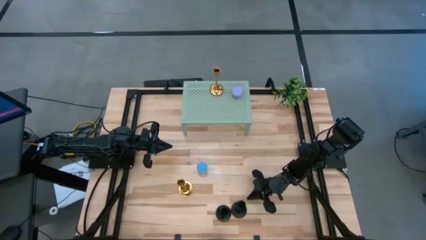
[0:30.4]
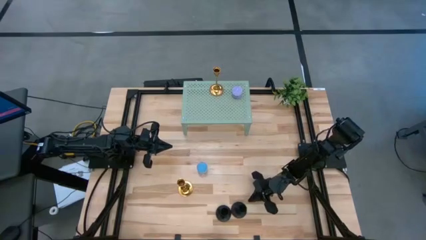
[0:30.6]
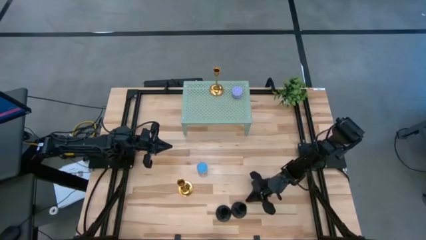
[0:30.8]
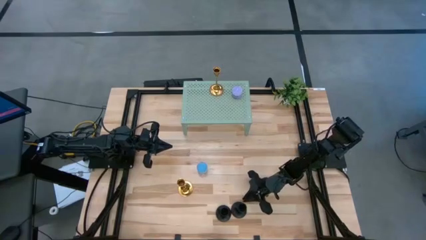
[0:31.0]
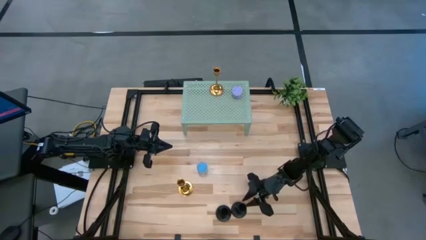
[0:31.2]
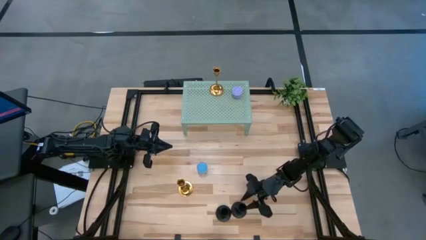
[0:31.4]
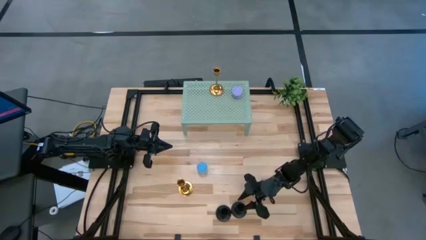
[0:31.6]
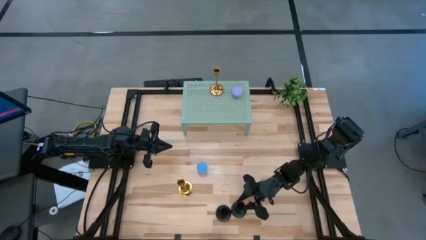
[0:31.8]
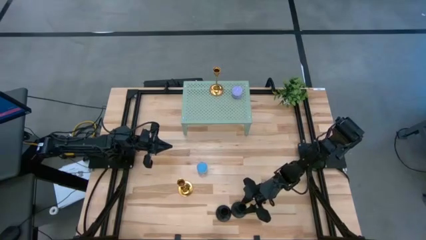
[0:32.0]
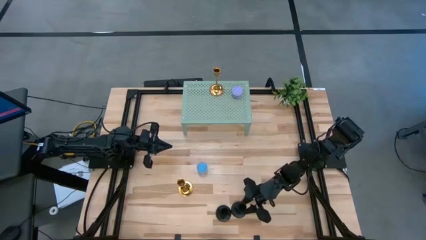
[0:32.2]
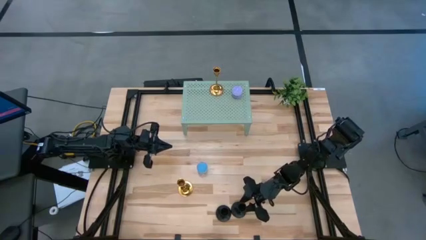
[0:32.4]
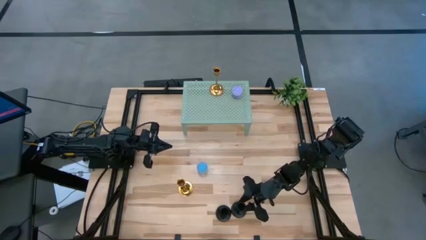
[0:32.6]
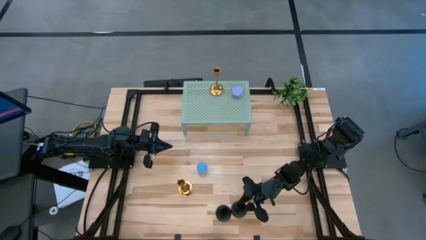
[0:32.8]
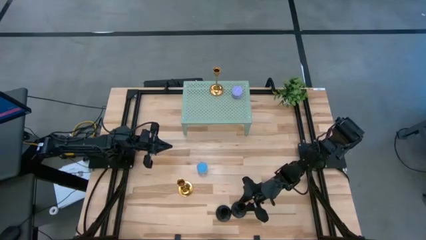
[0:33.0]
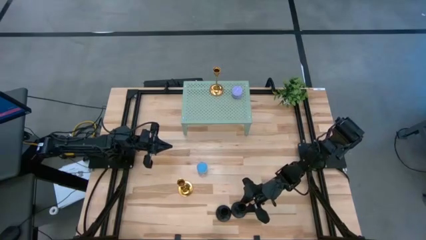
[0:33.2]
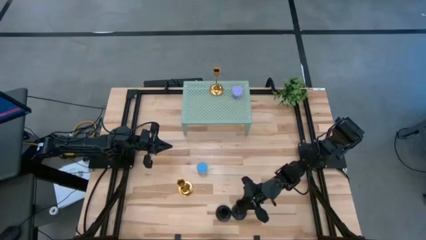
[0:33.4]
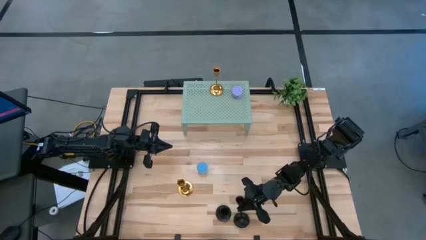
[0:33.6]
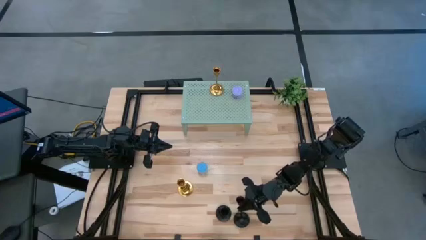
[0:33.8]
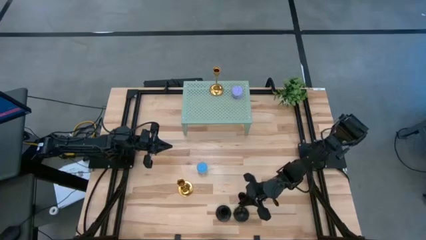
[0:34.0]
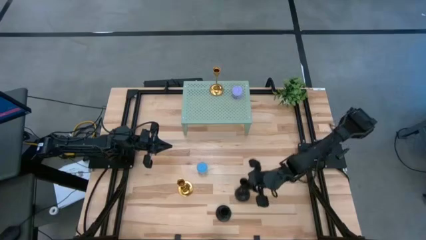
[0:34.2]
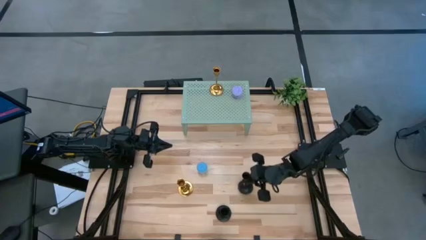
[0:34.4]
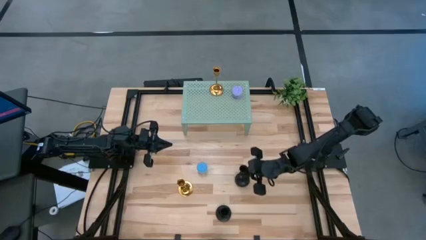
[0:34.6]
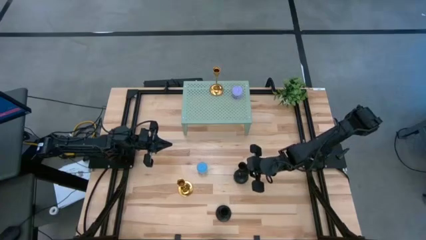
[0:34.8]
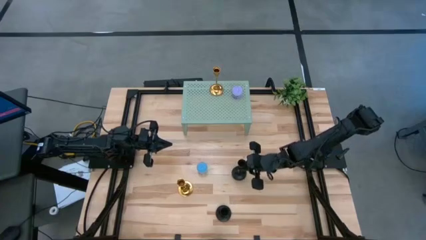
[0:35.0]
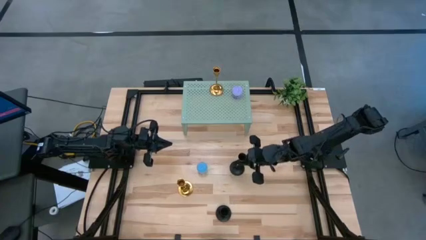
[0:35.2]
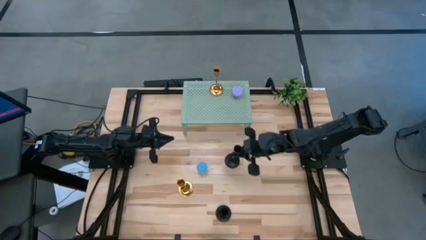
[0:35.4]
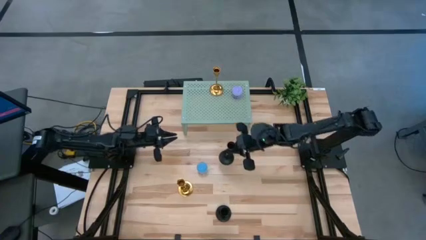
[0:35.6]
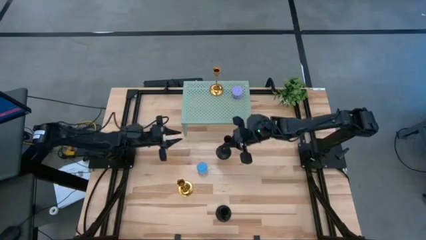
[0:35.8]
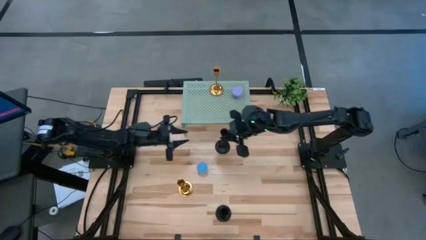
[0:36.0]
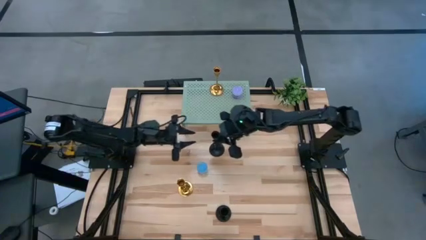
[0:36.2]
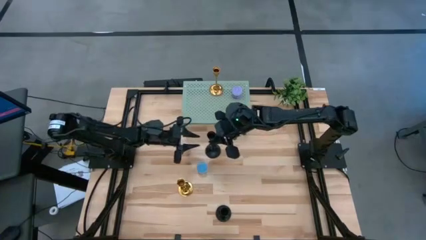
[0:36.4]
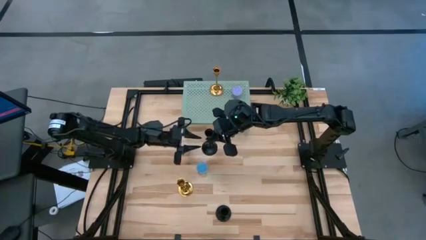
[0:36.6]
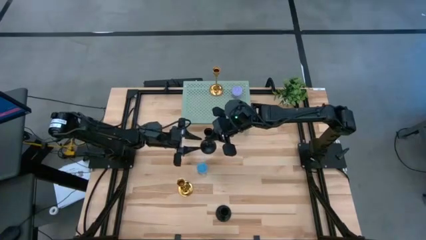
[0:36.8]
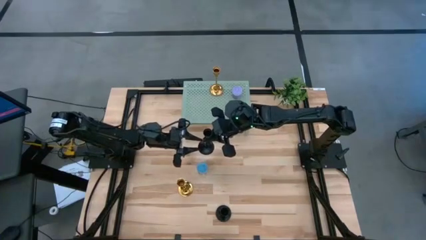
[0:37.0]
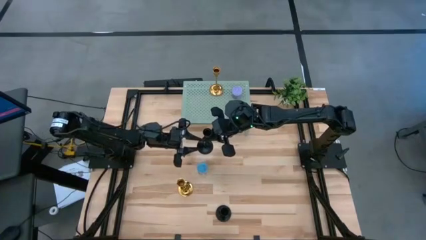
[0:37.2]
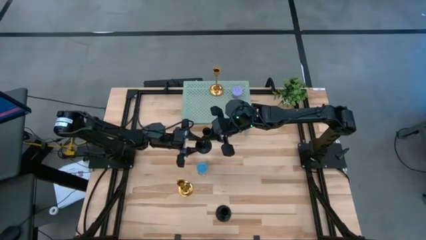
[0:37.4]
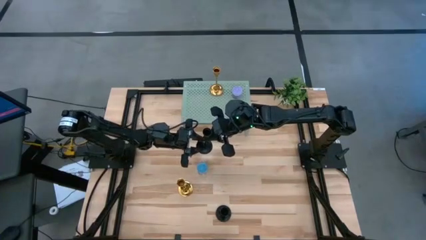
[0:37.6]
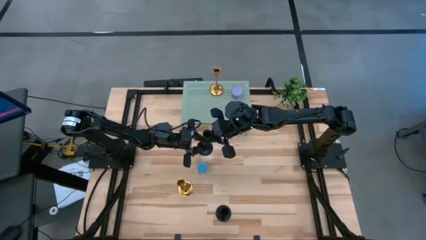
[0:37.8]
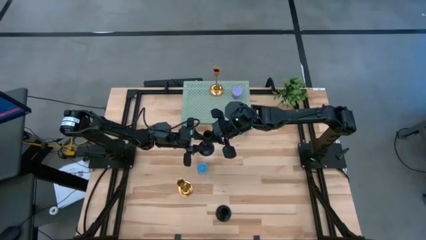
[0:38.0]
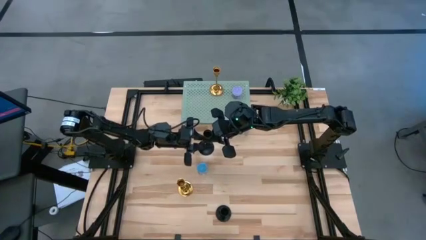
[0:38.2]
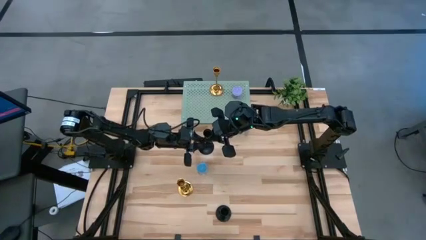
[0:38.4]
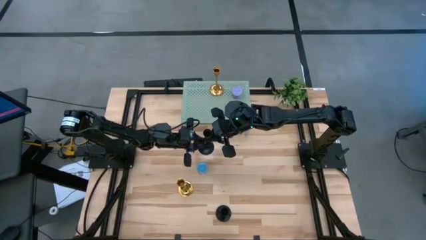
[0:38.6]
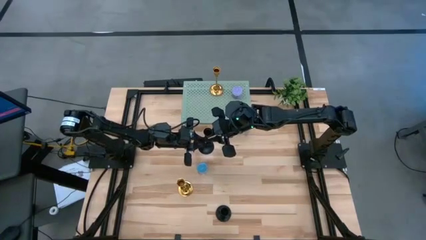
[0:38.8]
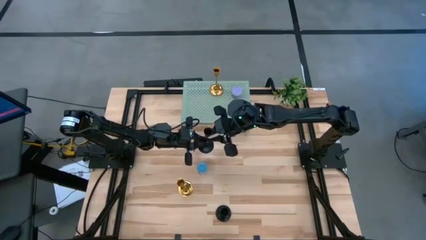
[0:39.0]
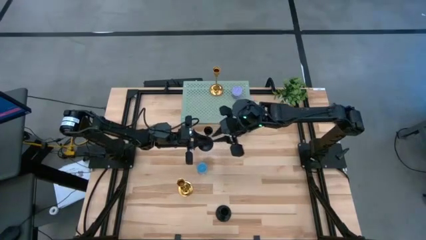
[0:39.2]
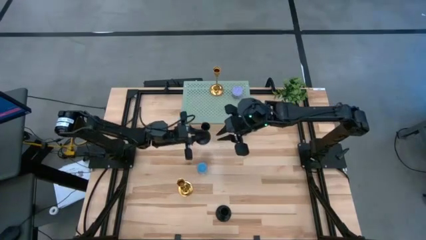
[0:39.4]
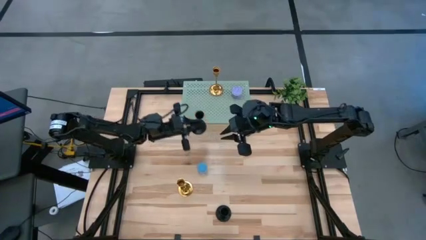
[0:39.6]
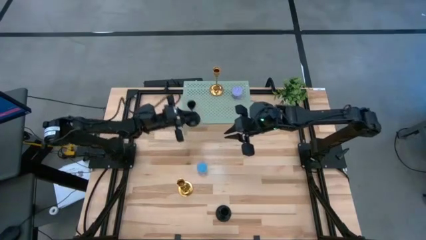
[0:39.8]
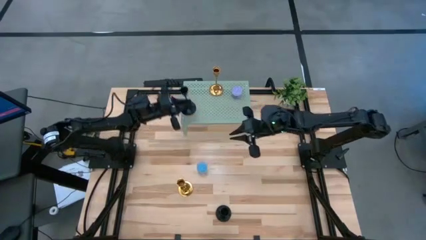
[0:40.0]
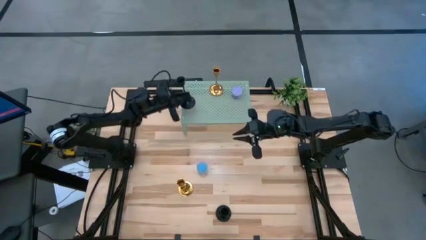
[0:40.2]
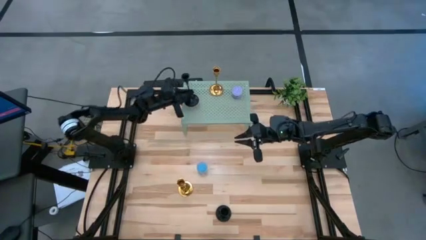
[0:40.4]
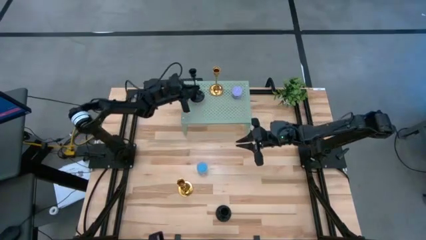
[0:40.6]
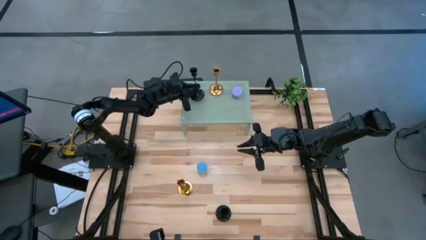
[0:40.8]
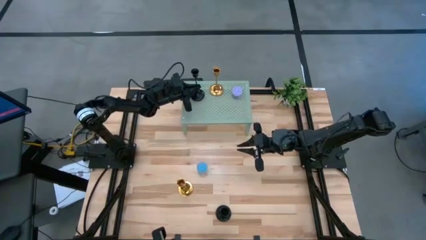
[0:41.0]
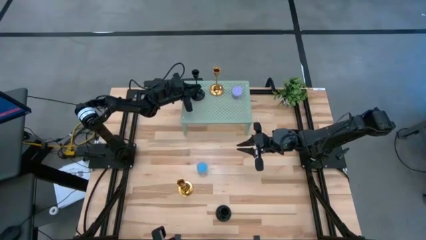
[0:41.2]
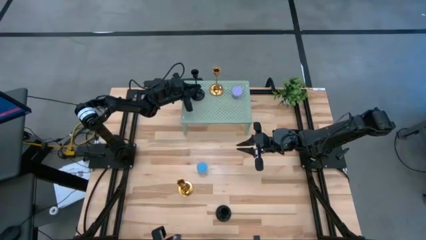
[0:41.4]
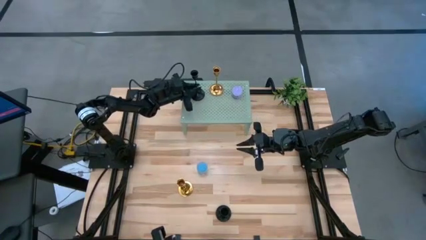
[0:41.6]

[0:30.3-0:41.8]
Task: Pick & Place candle stick holders
Put the right black candle holder on the shelf

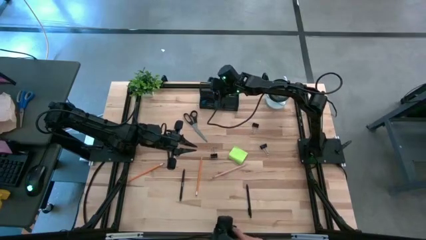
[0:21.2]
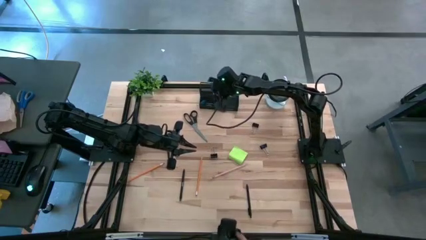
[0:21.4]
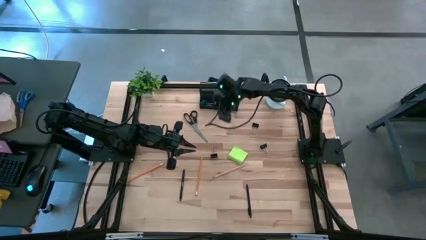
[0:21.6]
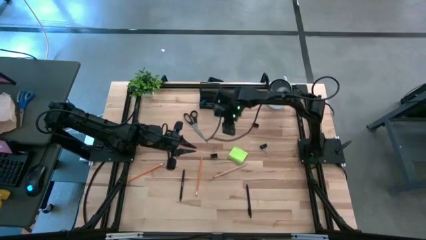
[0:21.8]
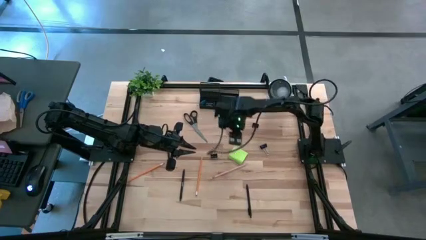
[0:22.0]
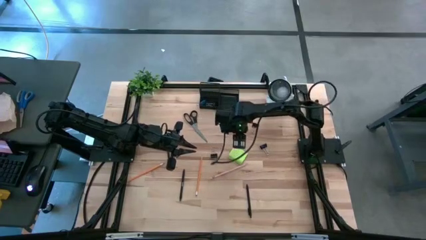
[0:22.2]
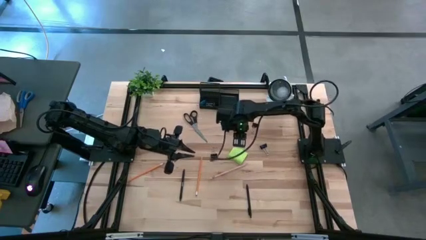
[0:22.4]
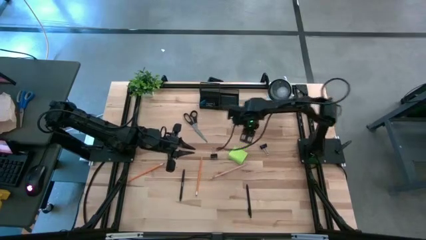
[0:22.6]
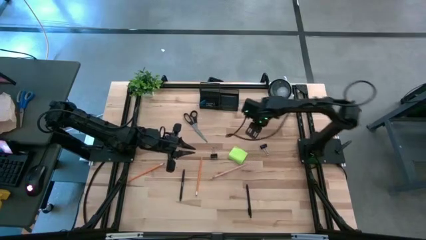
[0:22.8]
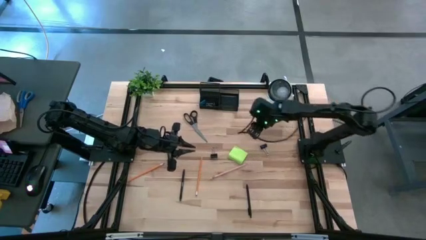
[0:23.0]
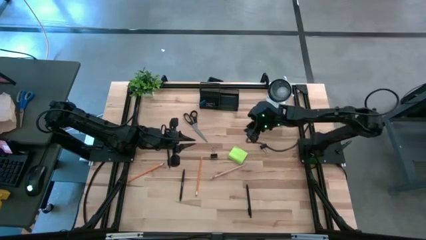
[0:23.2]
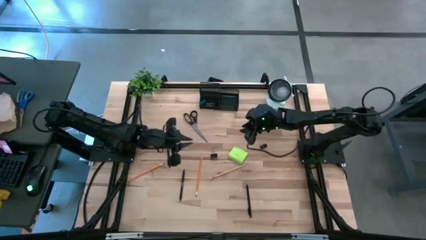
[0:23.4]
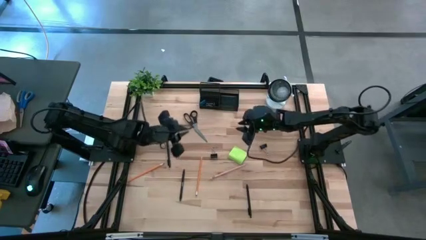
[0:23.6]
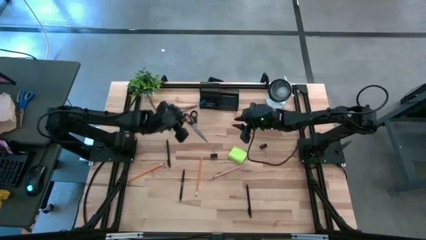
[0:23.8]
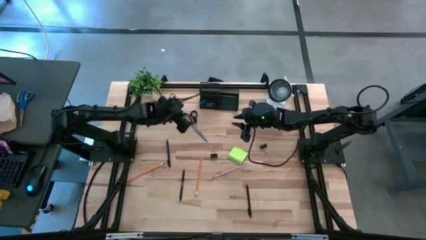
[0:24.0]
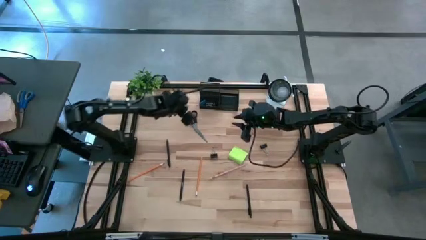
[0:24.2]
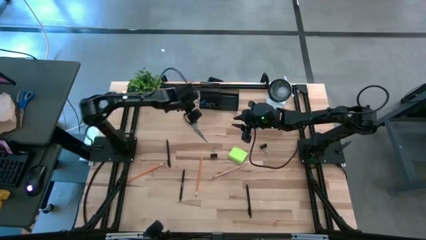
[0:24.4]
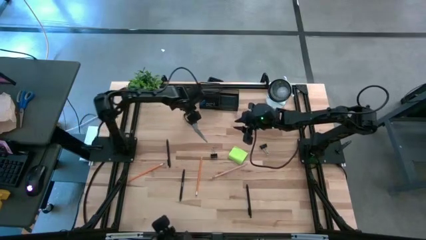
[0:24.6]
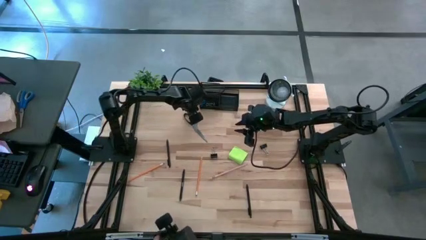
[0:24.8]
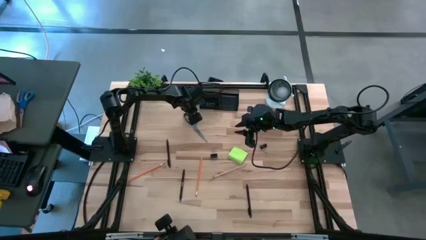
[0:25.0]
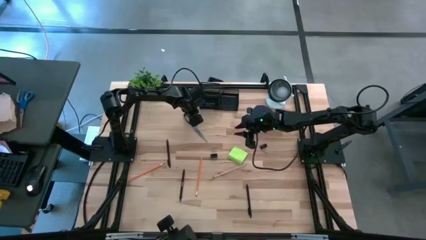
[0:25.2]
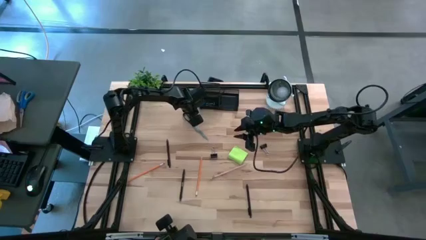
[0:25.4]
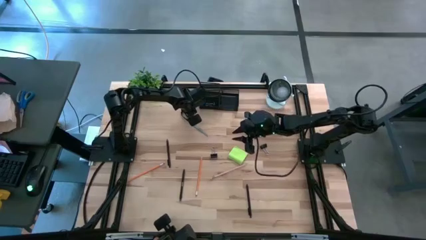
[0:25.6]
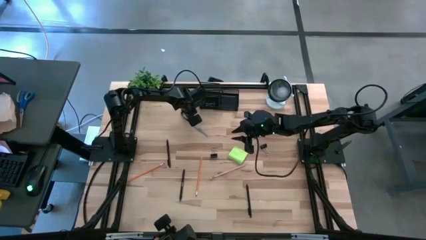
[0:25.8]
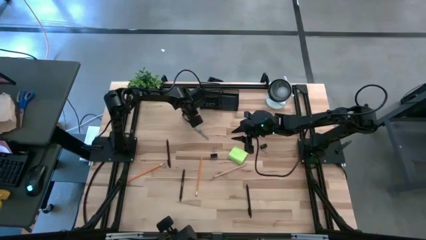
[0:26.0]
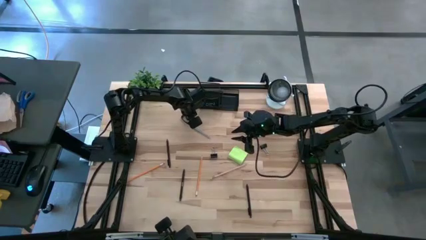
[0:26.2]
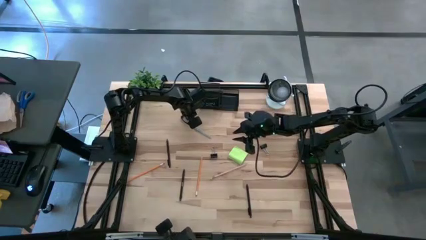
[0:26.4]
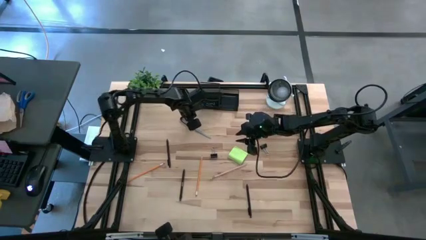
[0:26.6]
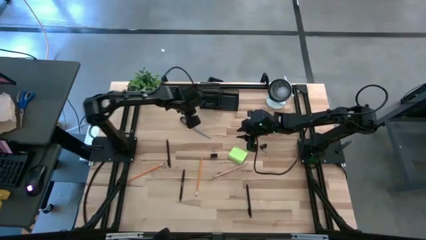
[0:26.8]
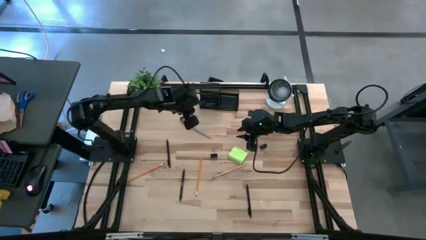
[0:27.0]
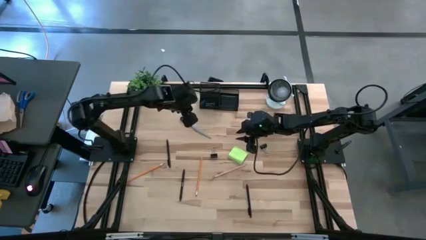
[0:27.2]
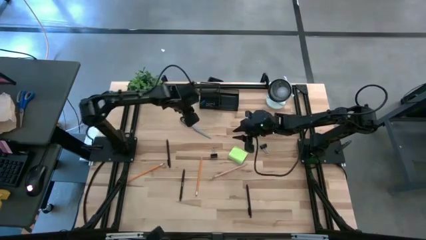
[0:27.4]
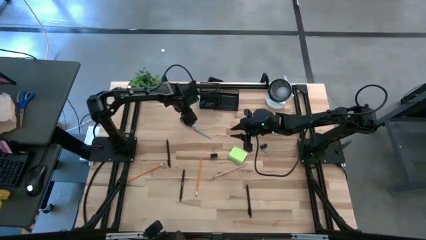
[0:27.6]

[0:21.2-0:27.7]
Task: Pick and place office supplies into organizer
Put the black scissors into the black desk organizer
